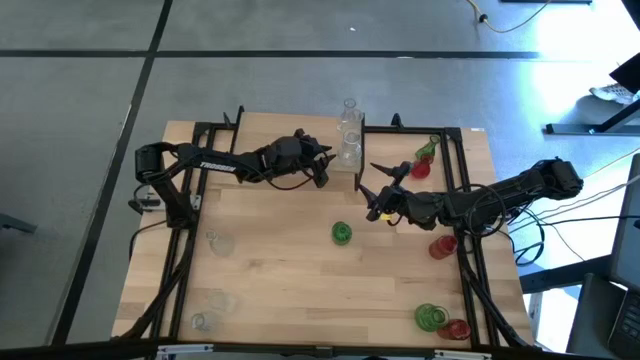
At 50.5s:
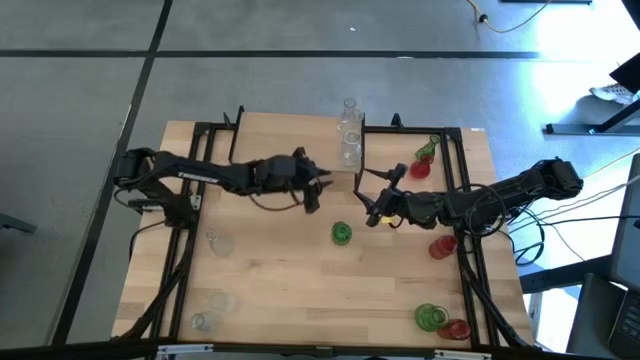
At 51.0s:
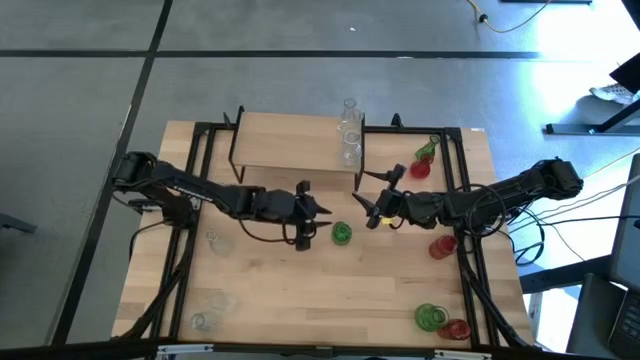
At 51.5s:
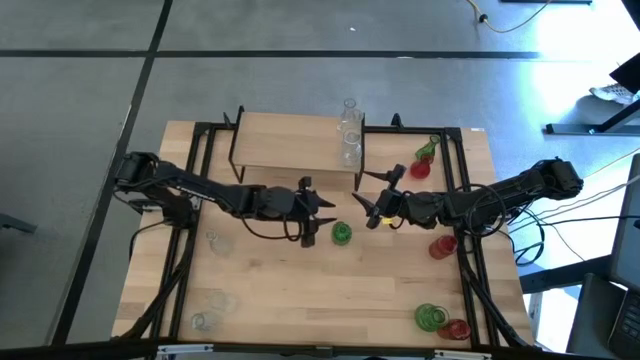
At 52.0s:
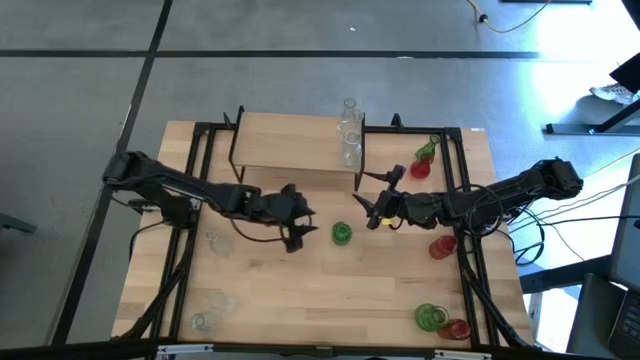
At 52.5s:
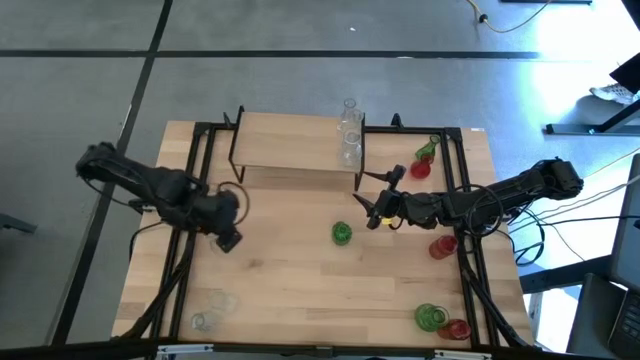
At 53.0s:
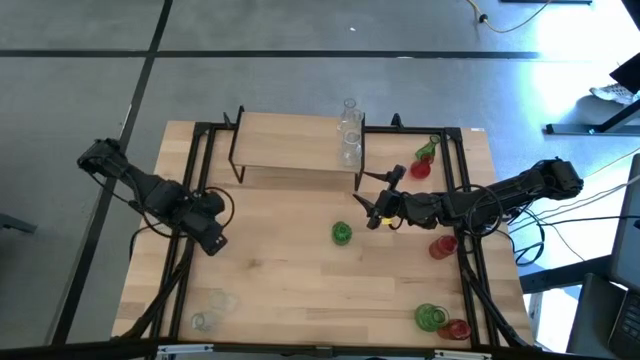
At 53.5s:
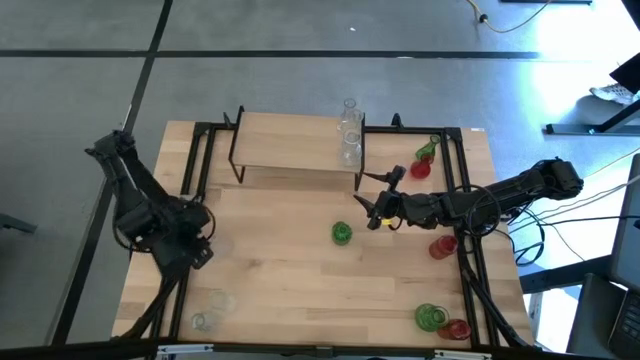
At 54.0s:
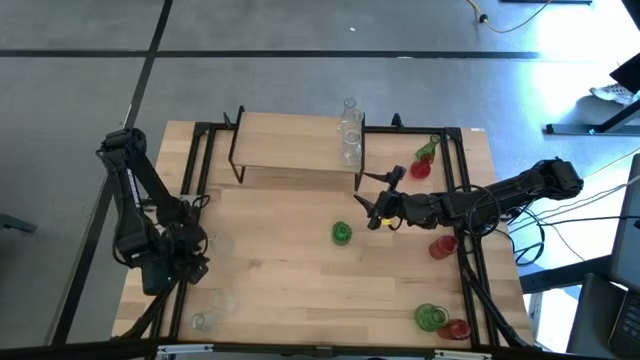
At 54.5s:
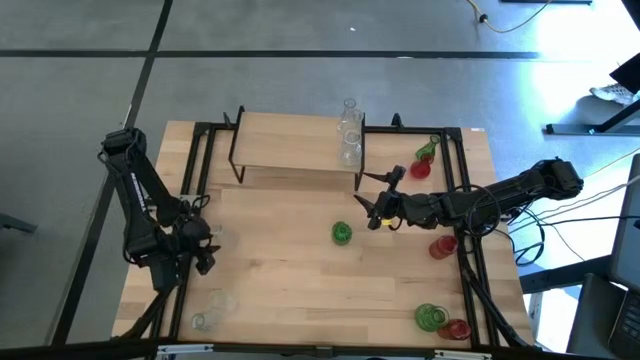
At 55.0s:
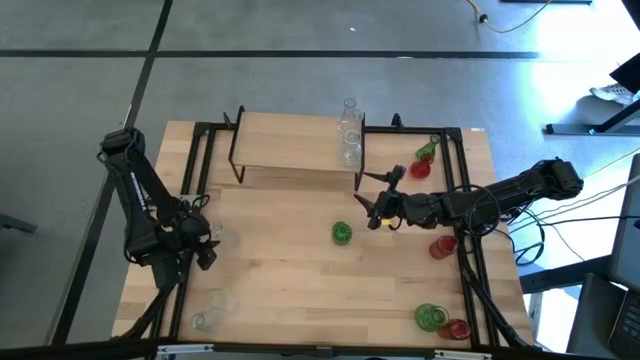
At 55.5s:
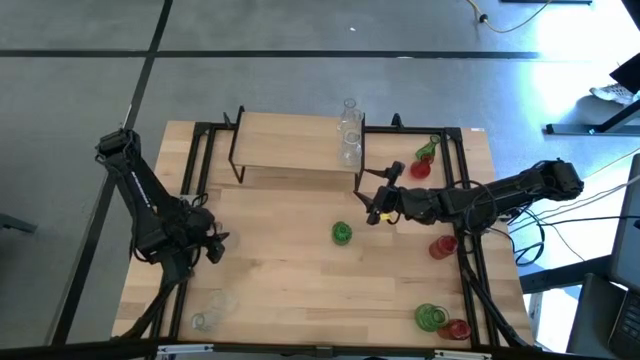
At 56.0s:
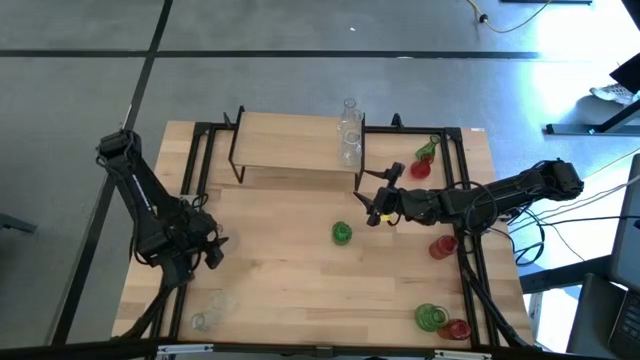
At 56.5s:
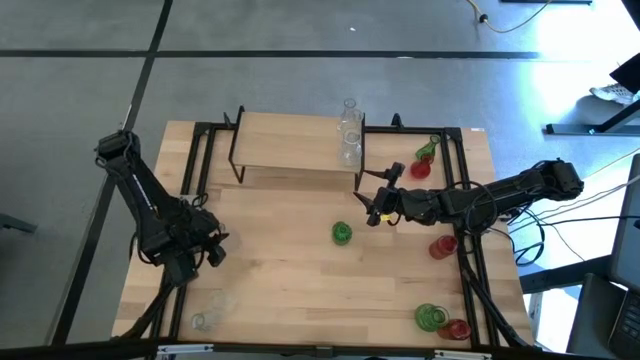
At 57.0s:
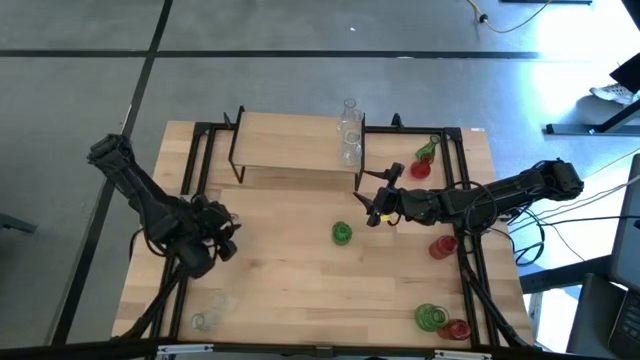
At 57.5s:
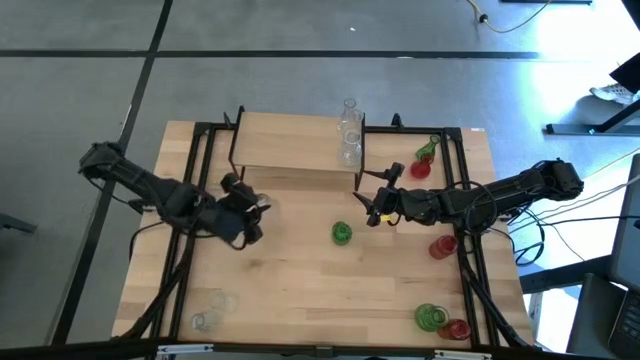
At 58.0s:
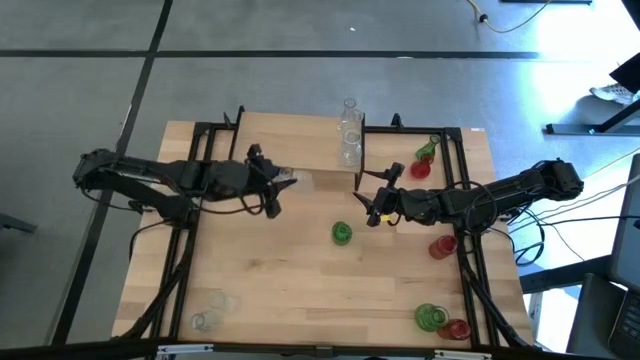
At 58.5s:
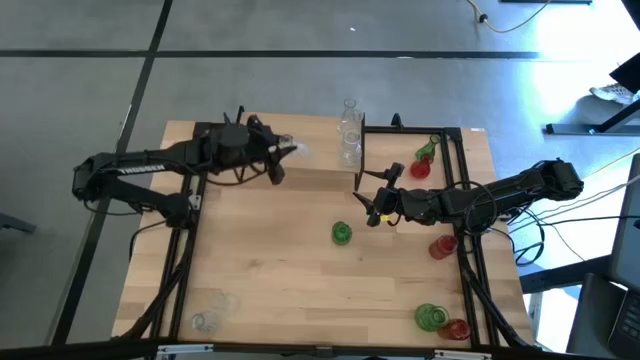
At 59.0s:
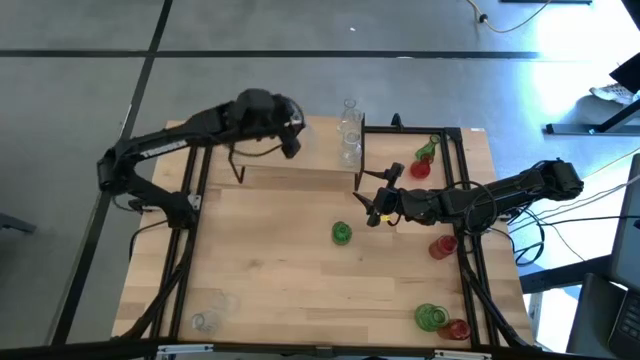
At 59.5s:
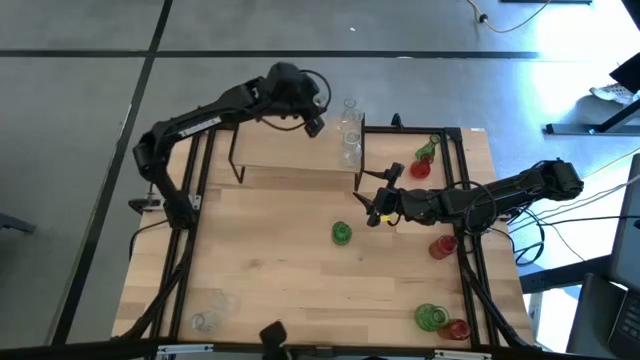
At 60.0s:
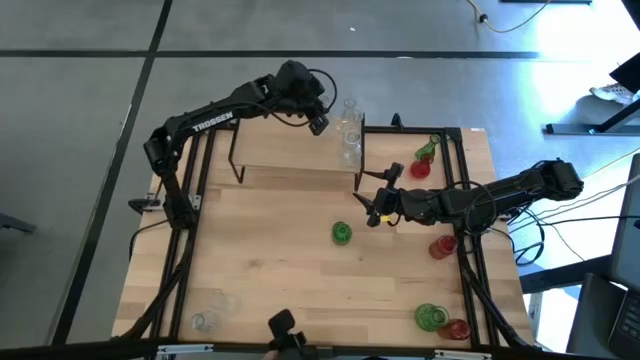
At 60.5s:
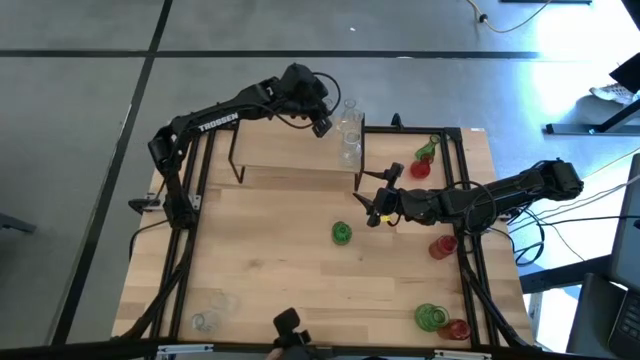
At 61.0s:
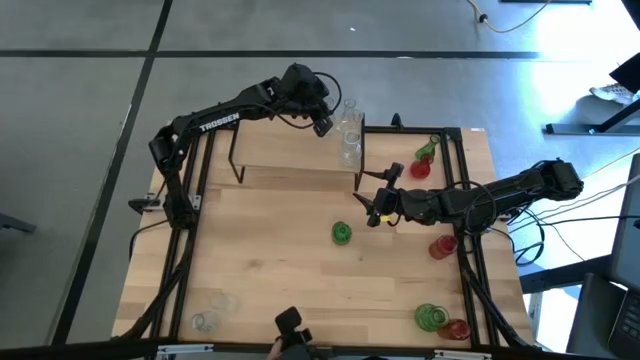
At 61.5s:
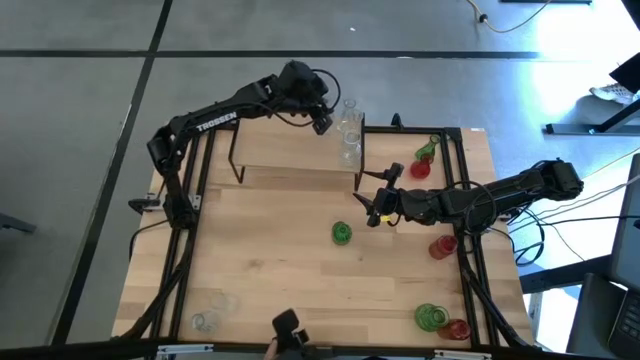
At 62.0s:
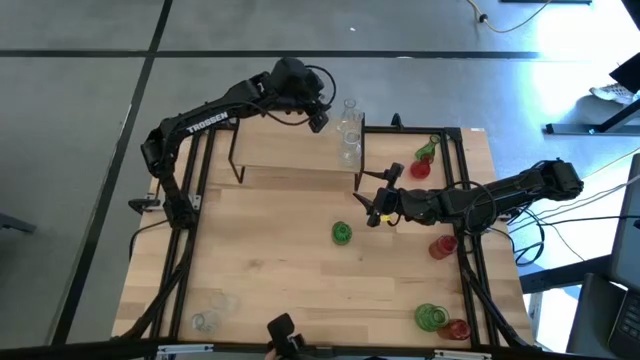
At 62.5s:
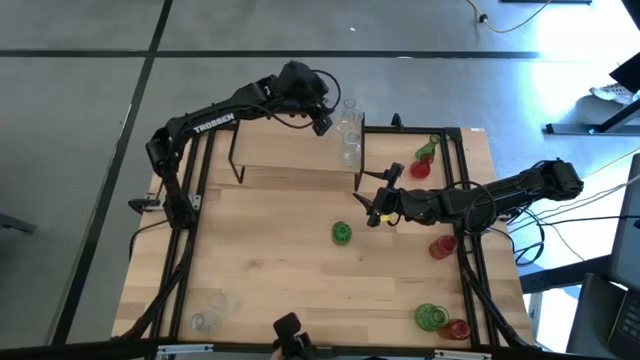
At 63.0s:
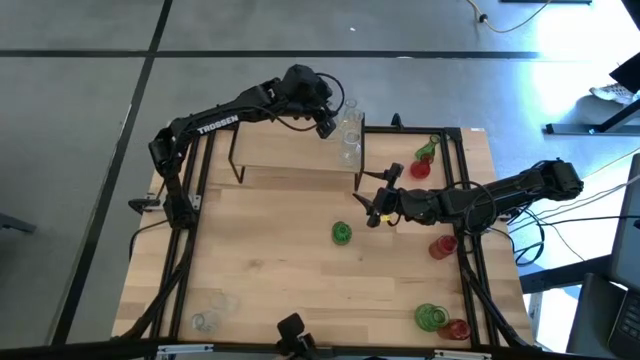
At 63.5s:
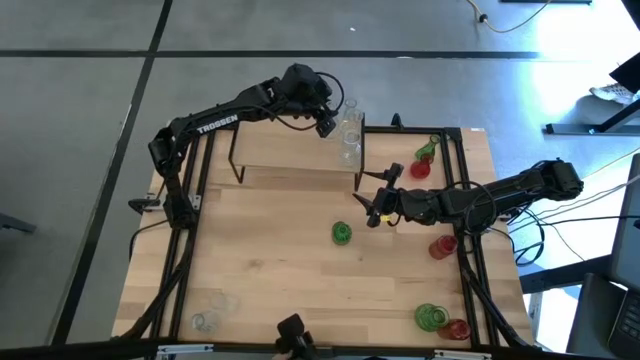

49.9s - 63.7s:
Task: sort vases onto shelf
Put the transparent vase on the shelf

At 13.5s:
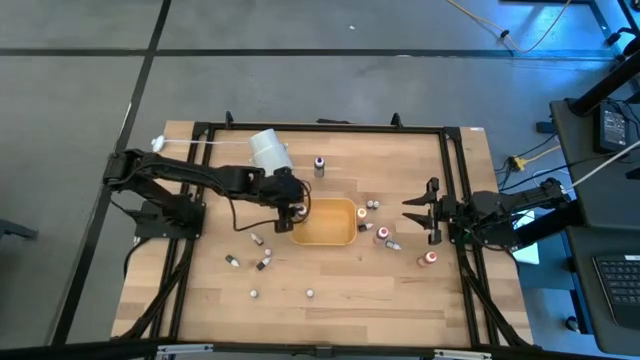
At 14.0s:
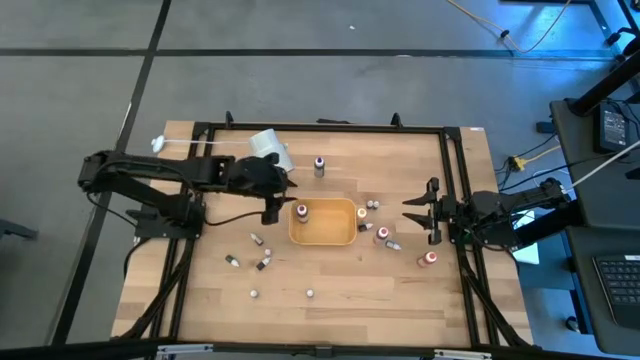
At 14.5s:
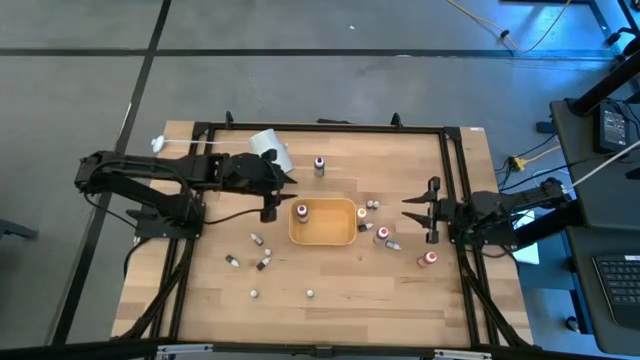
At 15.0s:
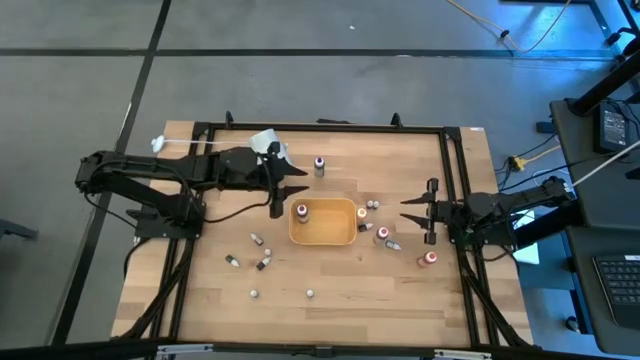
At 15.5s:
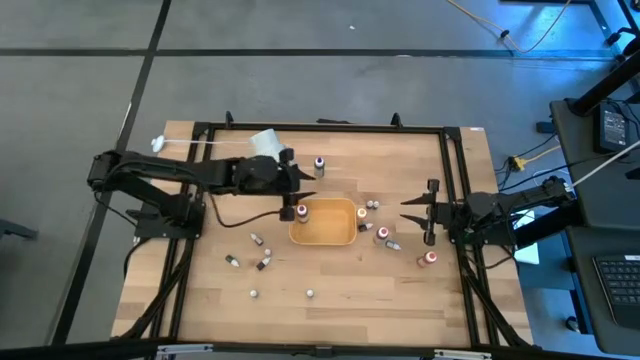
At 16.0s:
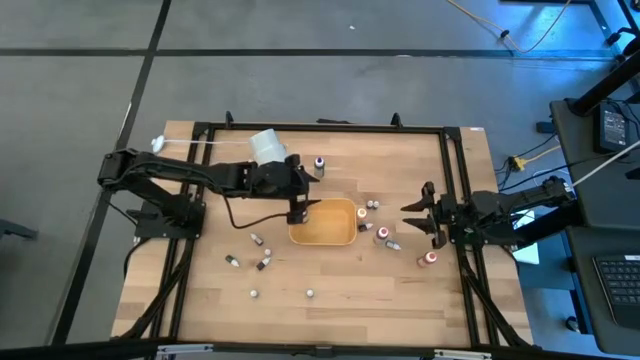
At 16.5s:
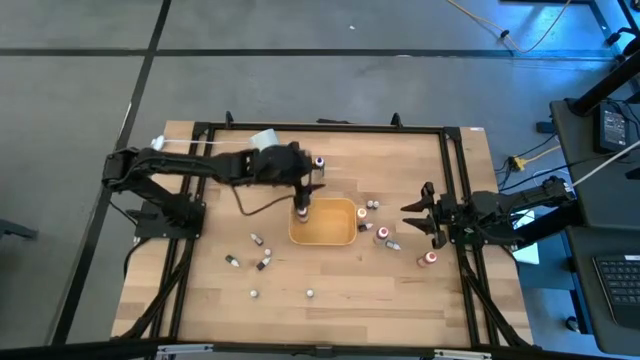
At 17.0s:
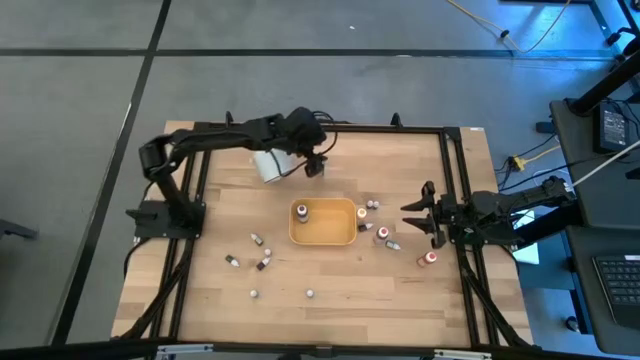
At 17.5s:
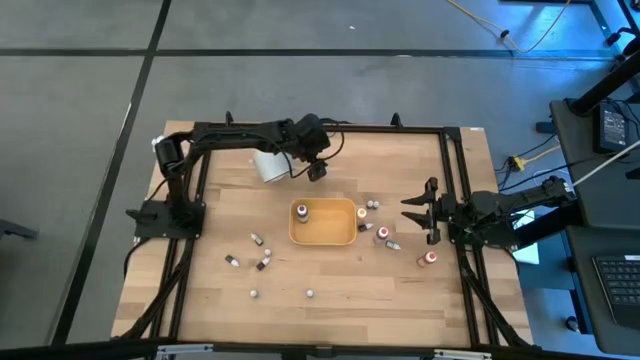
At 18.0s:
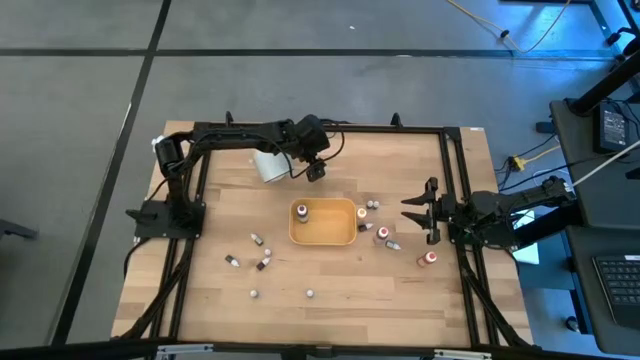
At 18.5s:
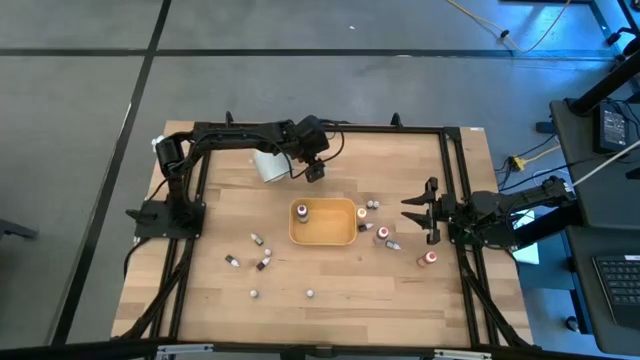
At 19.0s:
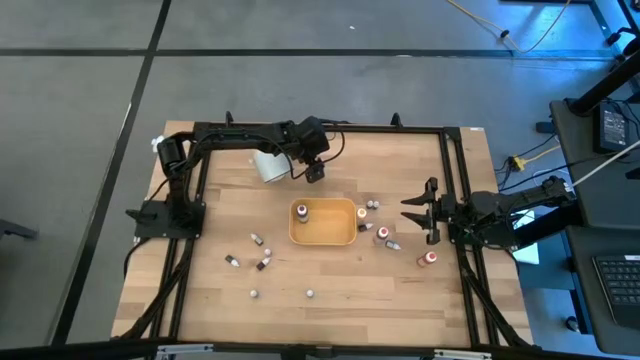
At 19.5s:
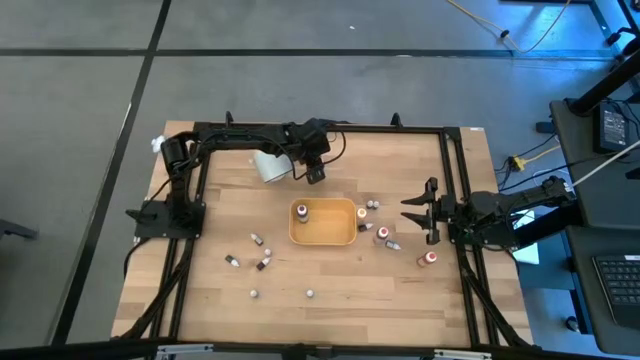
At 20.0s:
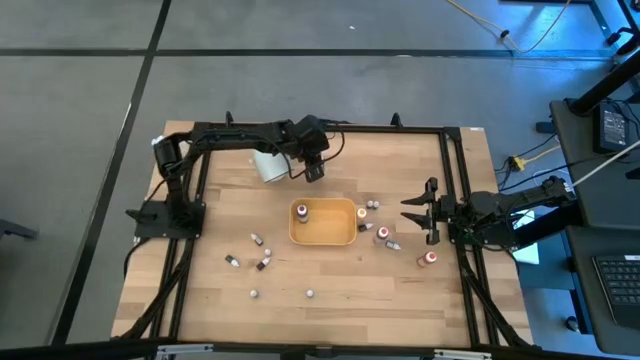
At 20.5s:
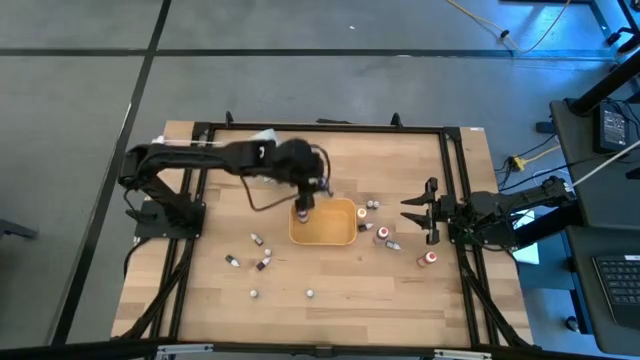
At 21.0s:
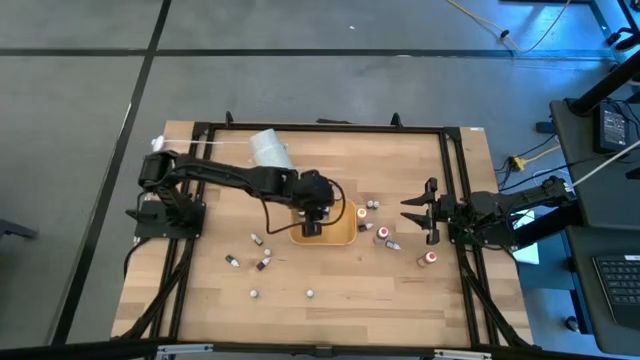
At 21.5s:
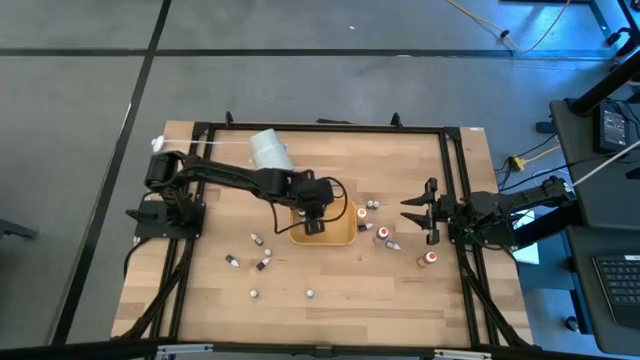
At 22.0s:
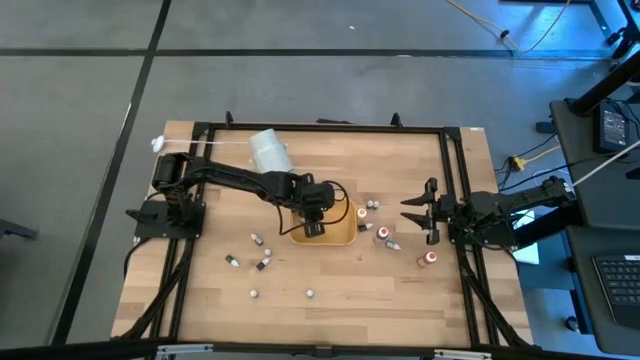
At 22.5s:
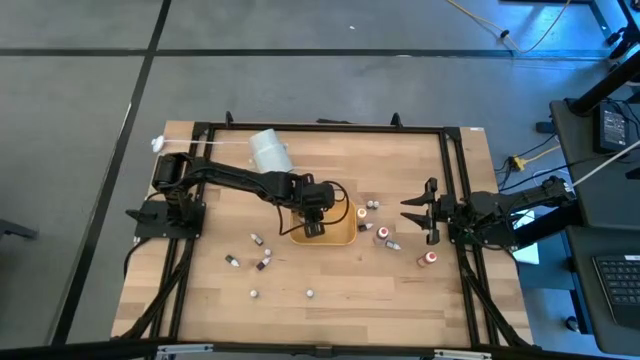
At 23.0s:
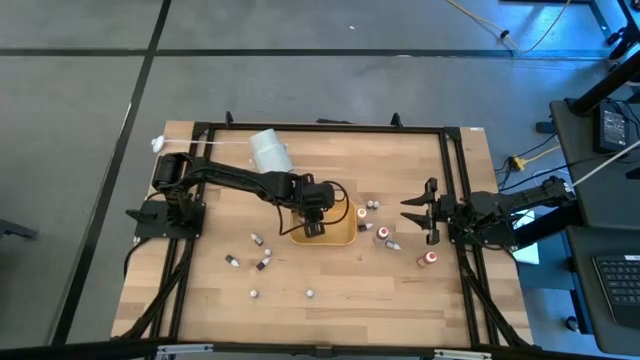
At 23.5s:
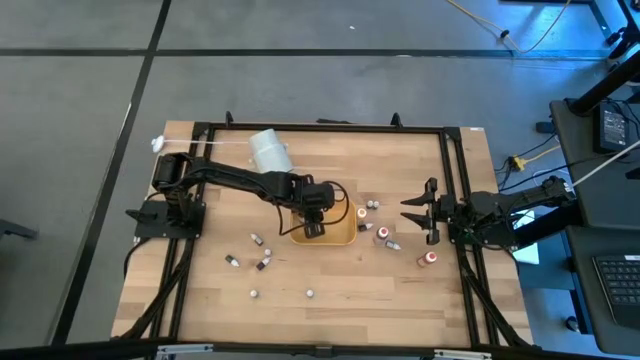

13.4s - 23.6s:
Task: Pick & Place food coloring
Put the large blue ink bottle into the yellow bin
